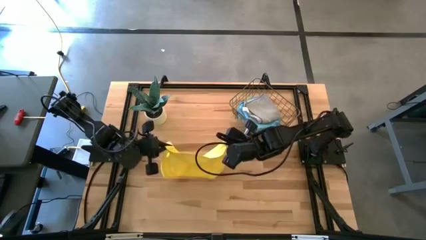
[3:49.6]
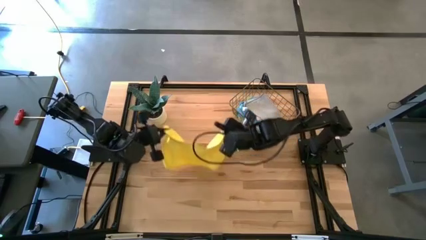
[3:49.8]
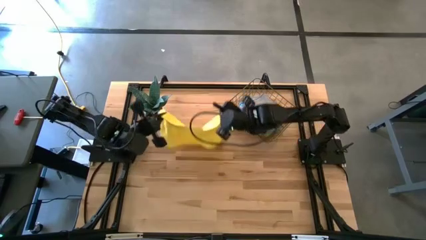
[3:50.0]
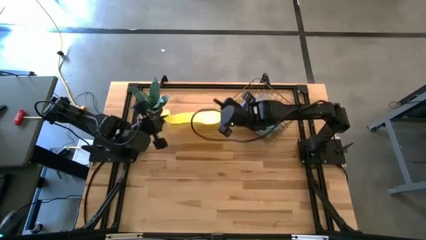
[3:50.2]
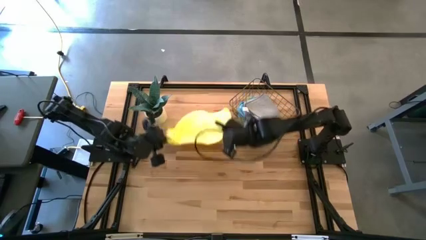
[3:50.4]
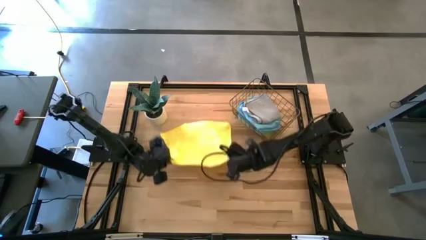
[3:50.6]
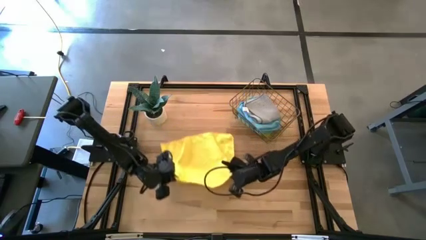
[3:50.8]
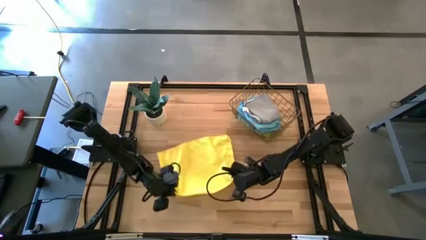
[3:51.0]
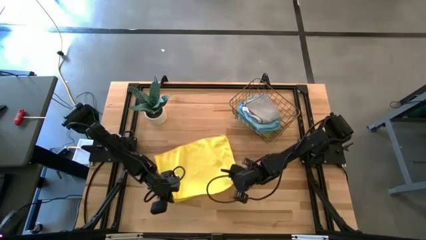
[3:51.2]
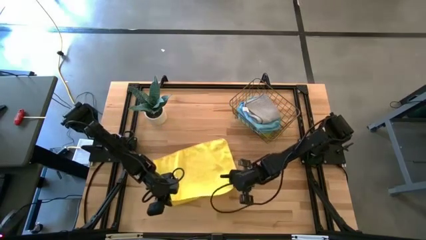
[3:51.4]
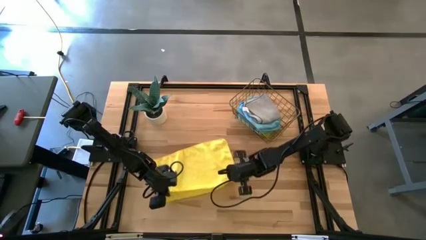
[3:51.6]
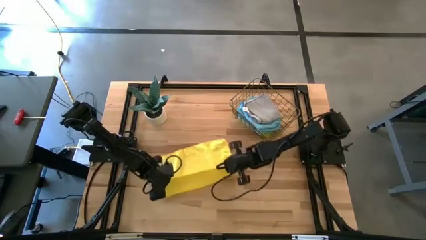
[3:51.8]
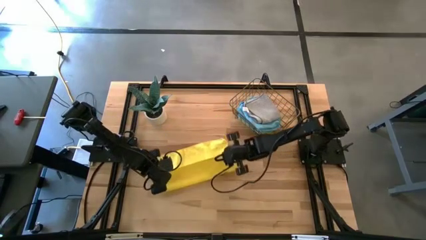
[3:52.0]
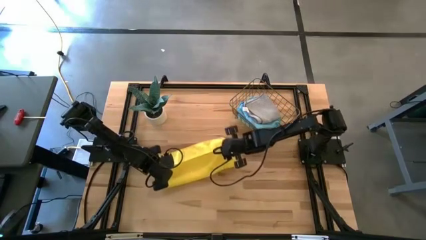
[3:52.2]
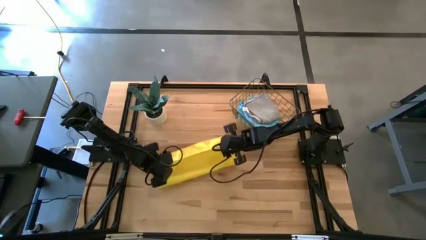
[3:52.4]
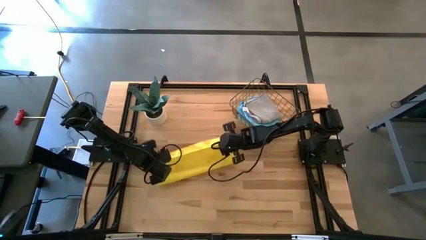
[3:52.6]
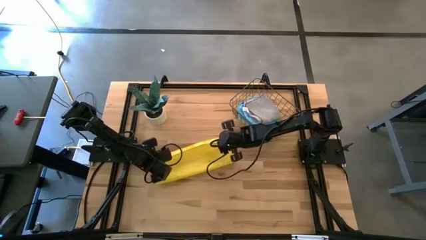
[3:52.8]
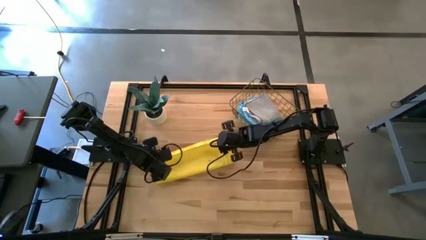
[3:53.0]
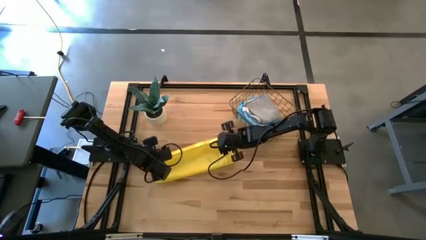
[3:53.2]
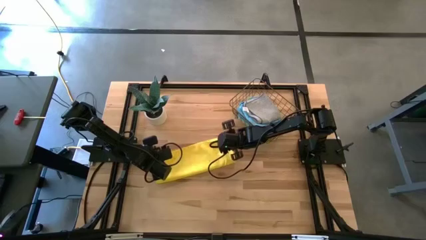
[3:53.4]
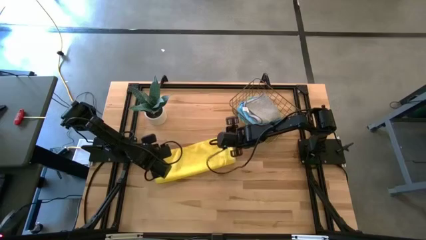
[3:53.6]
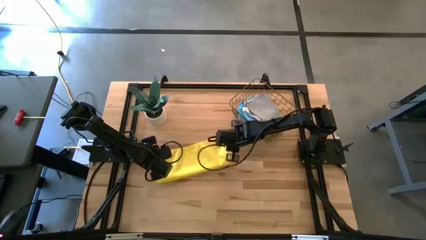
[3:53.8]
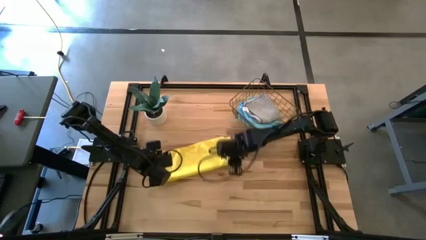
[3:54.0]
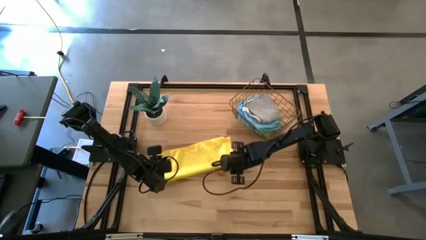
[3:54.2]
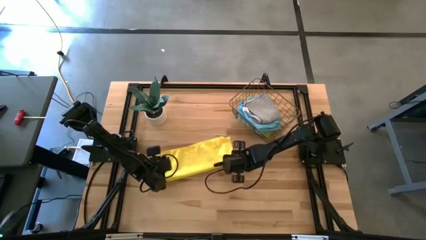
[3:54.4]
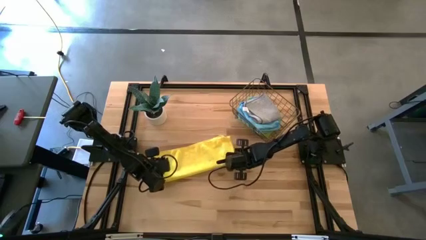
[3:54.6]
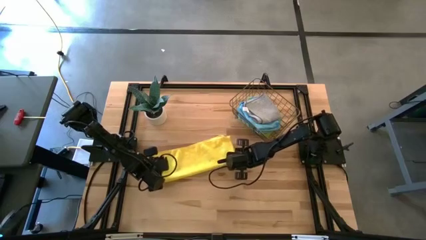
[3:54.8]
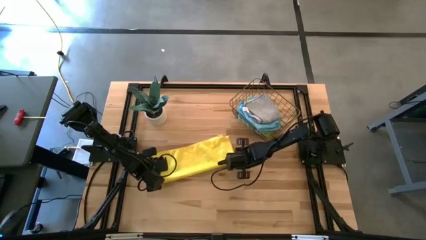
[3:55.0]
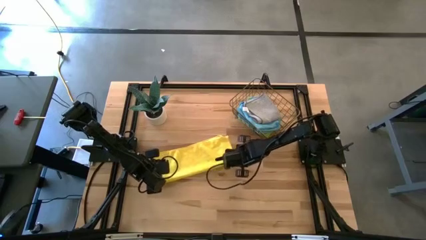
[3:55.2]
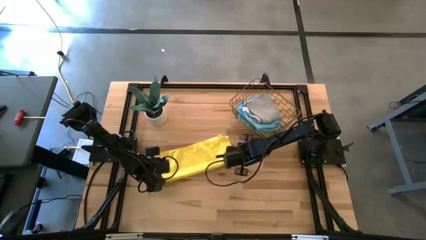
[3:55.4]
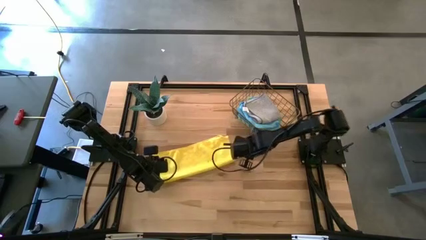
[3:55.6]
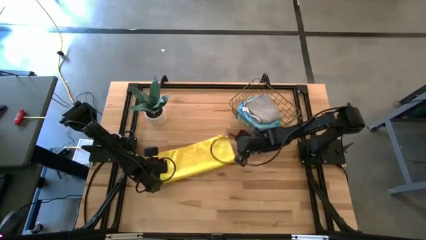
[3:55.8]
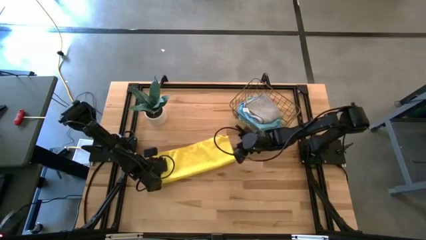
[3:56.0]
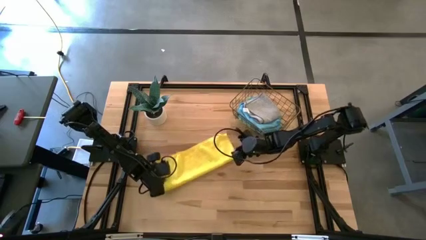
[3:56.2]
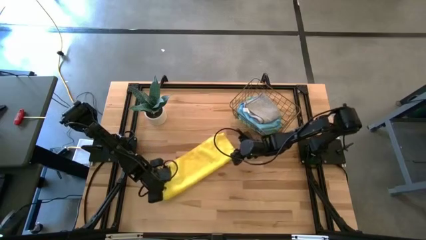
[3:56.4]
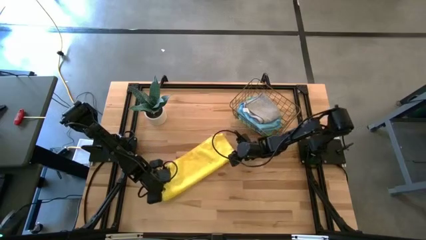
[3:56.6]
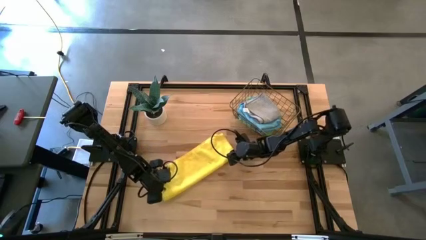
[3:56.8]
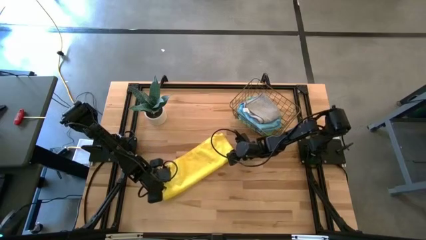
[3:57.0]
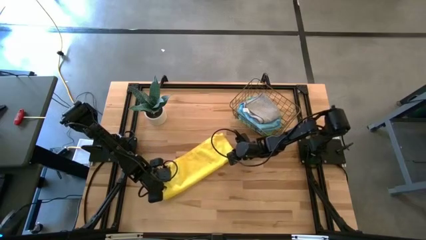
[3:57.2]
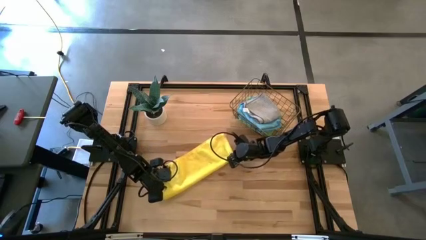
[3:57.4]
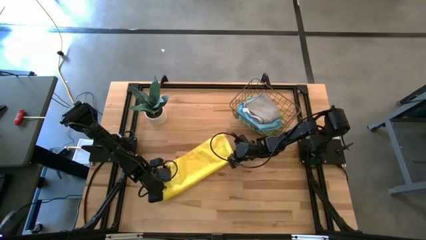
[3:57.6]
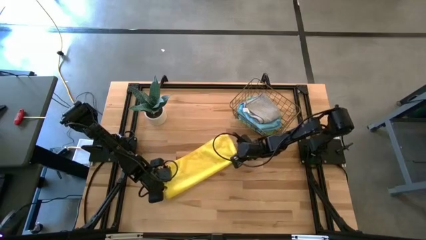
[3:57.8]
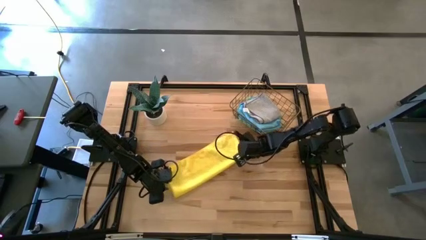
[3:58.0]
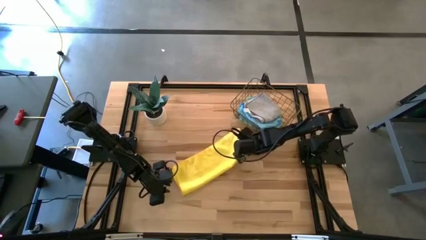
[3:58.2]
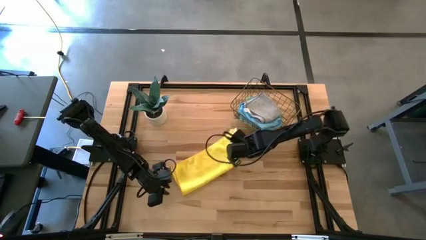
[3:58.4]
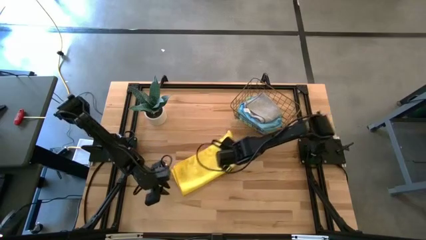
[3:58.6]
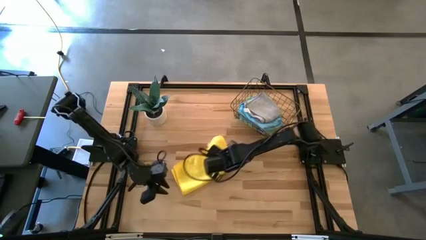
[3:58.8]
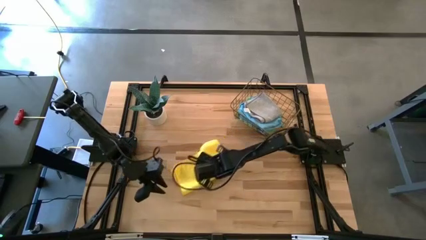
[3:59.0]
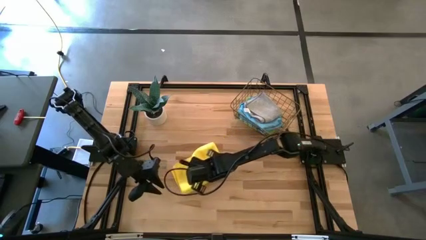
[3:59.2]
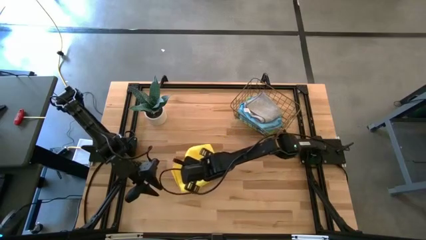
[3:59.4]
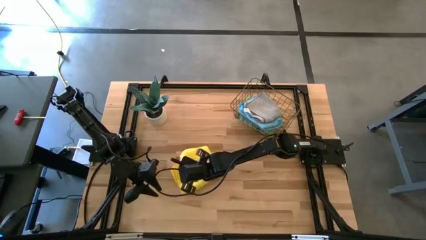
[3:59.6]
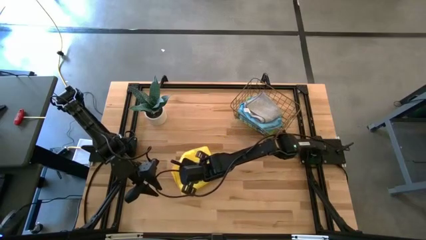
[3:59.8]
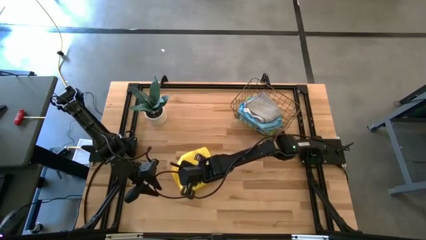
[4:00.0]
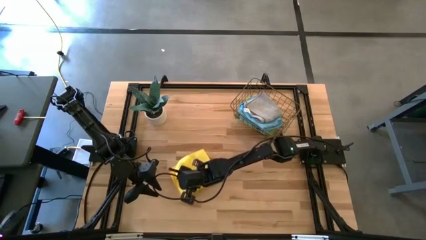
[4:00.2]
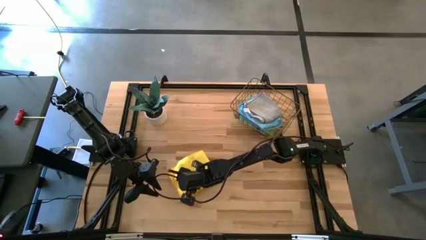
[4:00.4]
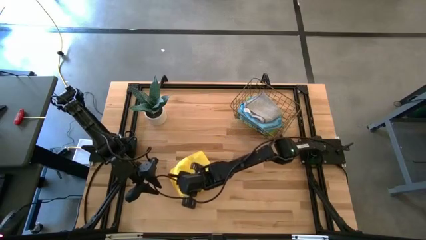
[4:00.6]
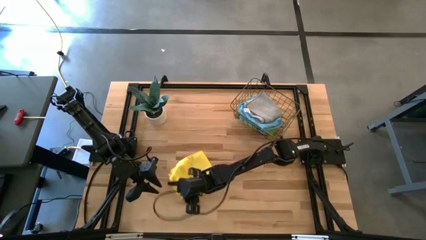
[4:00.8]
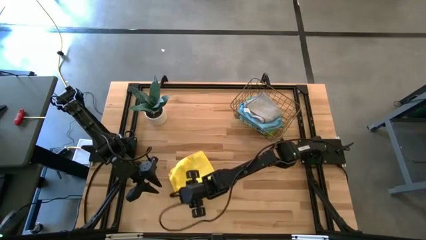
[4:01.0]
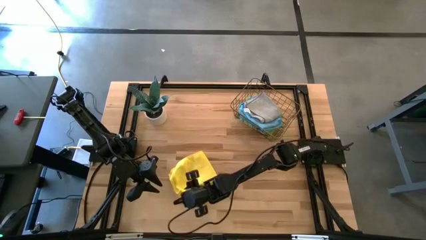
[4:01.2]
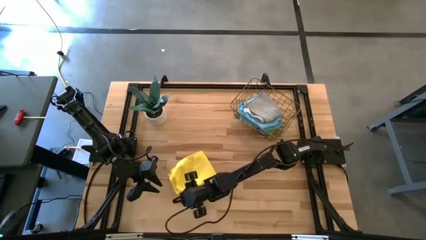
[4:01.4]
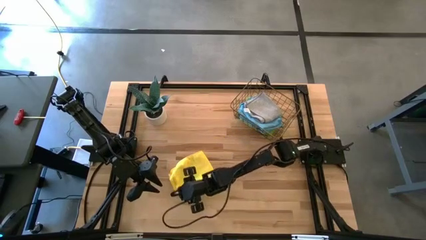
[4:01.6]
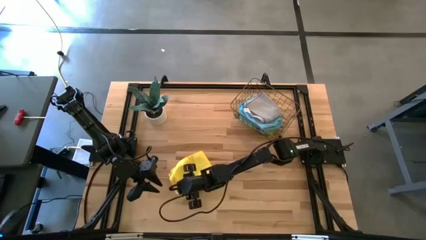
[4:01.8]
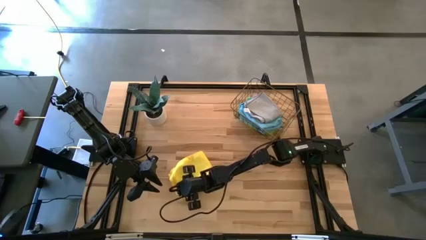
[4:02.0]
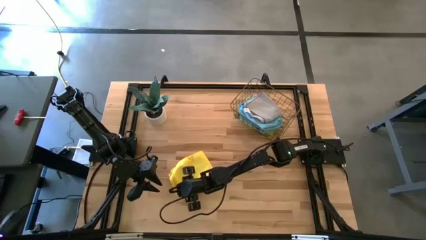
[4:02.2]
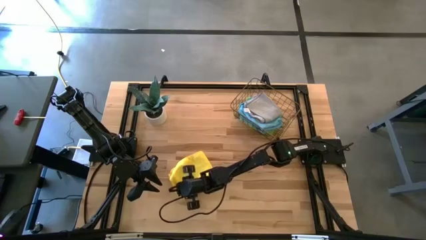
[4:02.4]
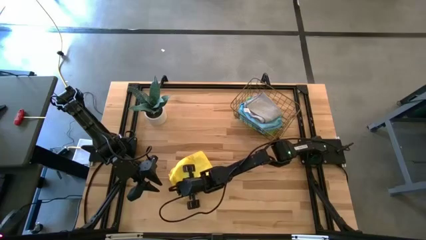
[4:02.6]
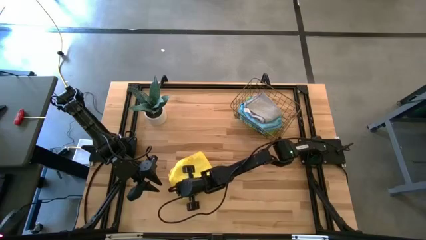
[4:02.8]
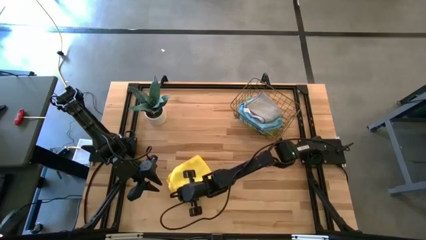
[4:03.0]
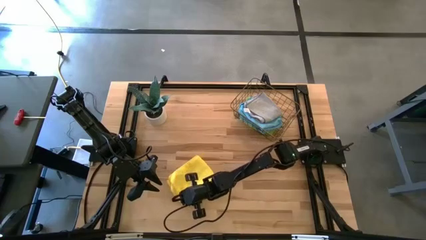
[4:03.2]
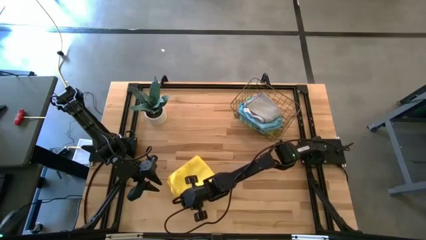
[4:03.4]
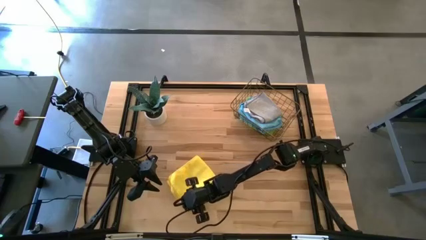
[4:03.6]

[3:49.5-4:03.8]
Task: Fold microfiber towels
Fold the yellow microfiber towel
